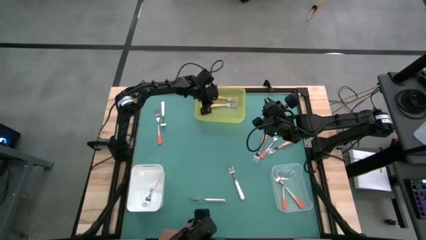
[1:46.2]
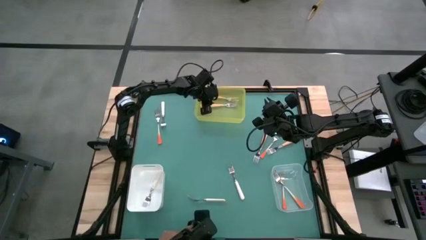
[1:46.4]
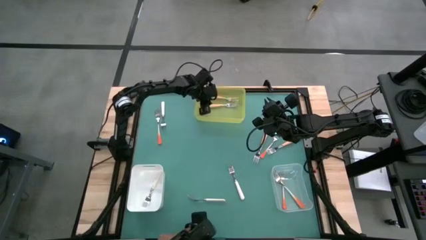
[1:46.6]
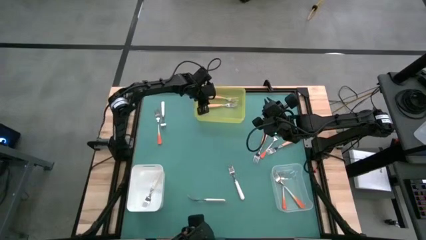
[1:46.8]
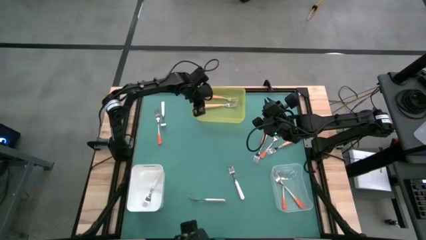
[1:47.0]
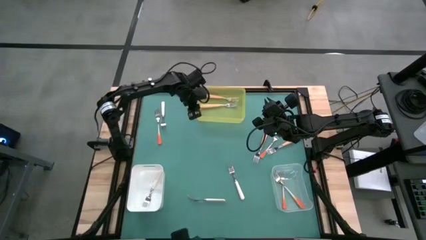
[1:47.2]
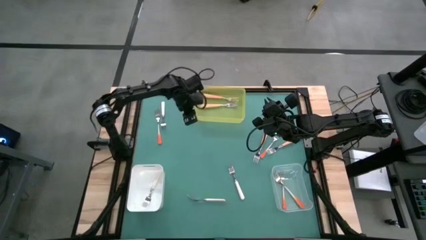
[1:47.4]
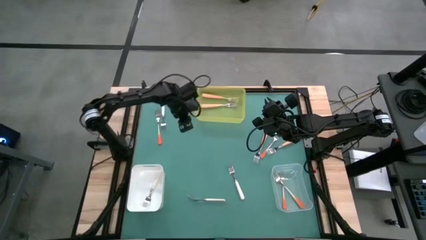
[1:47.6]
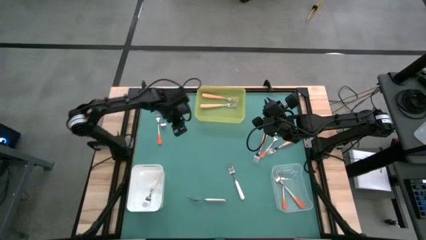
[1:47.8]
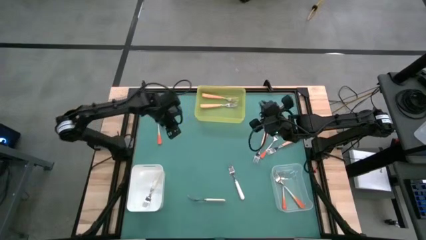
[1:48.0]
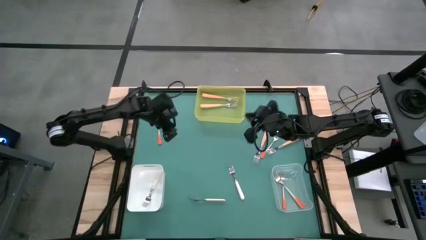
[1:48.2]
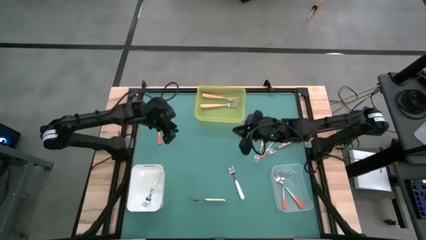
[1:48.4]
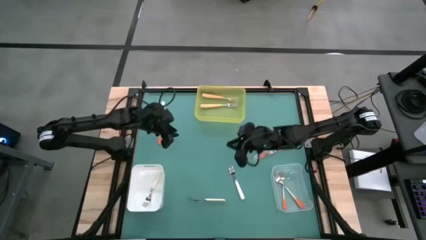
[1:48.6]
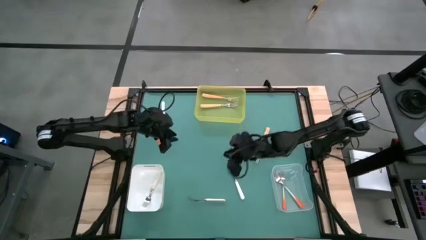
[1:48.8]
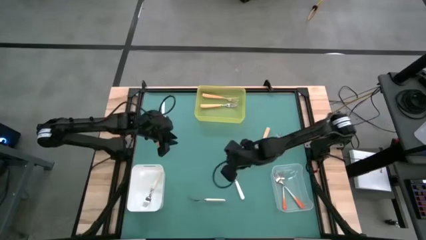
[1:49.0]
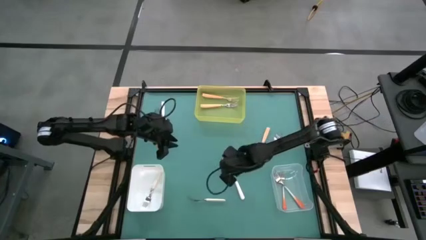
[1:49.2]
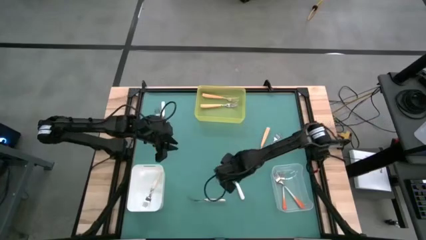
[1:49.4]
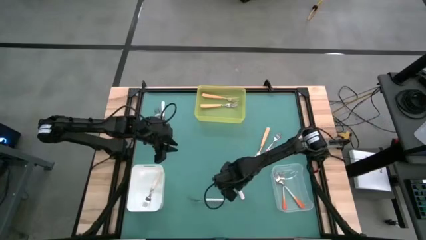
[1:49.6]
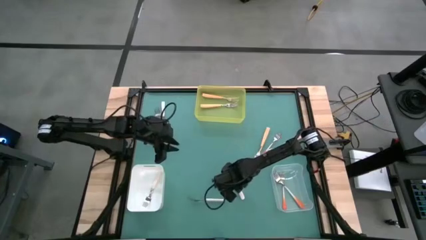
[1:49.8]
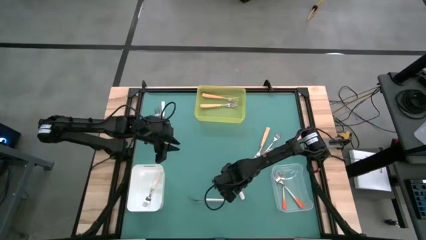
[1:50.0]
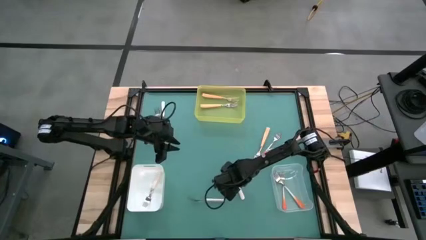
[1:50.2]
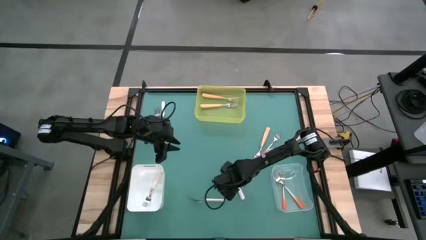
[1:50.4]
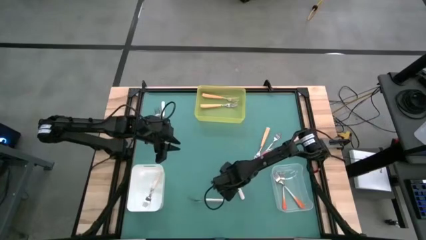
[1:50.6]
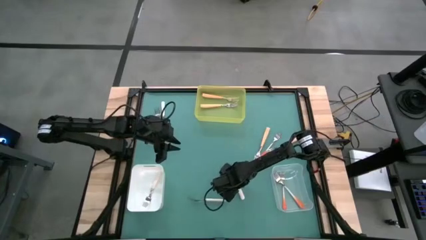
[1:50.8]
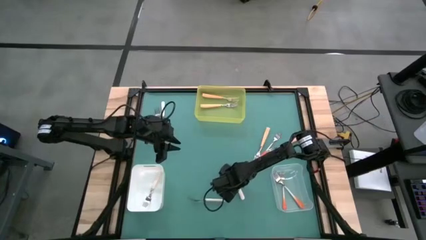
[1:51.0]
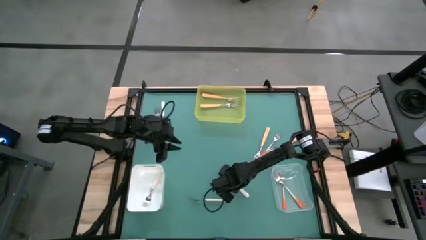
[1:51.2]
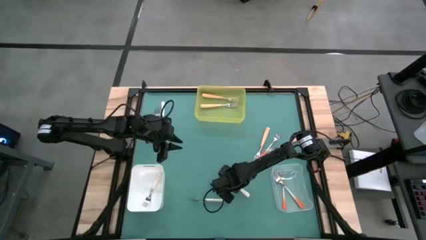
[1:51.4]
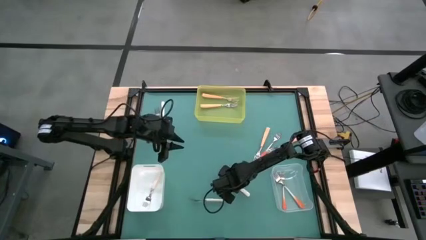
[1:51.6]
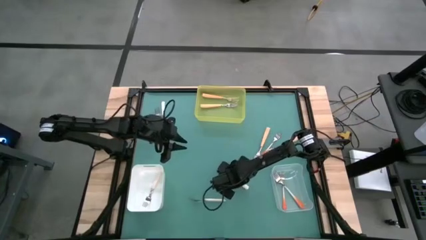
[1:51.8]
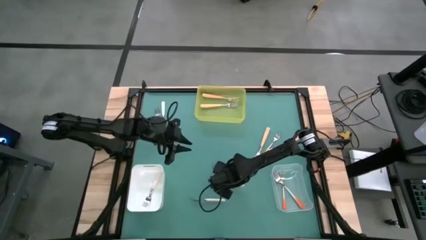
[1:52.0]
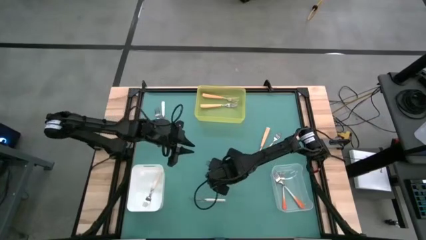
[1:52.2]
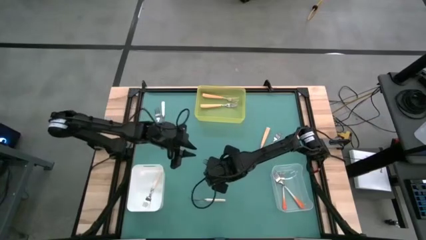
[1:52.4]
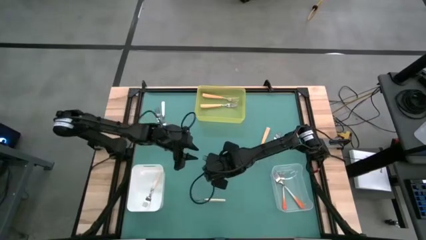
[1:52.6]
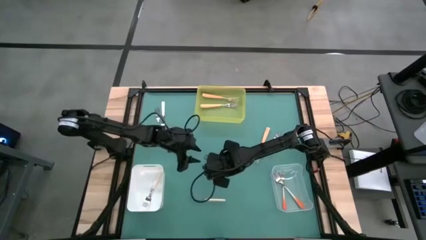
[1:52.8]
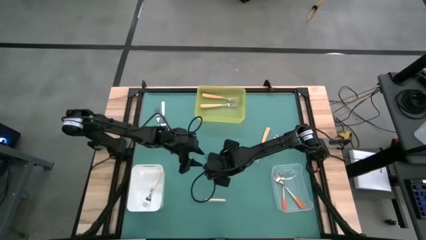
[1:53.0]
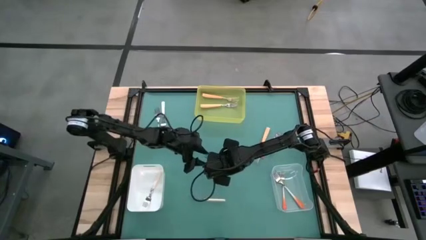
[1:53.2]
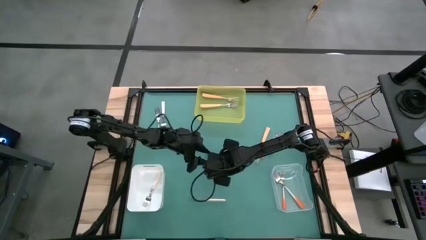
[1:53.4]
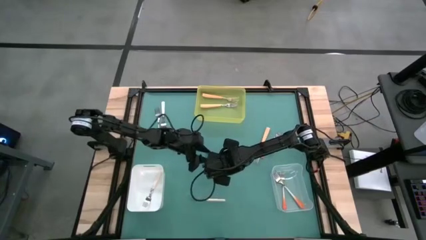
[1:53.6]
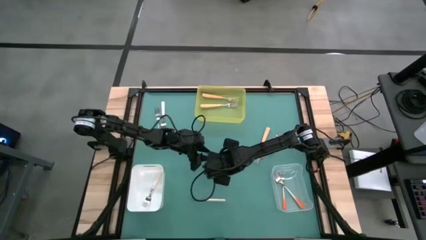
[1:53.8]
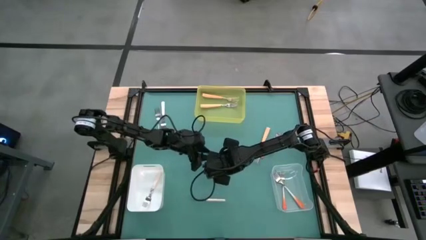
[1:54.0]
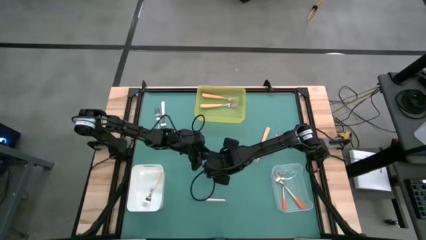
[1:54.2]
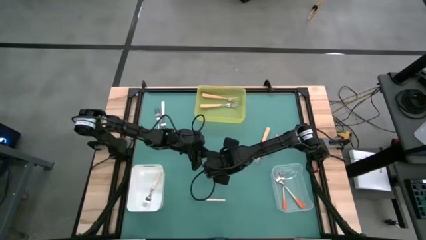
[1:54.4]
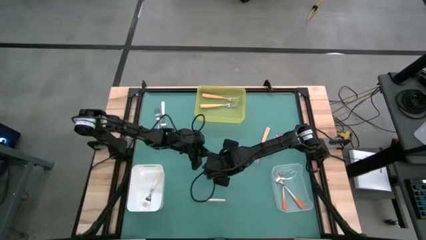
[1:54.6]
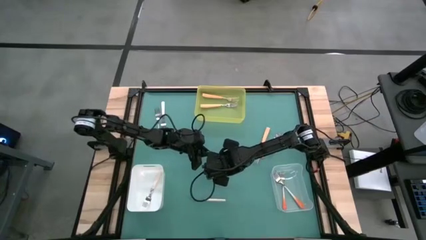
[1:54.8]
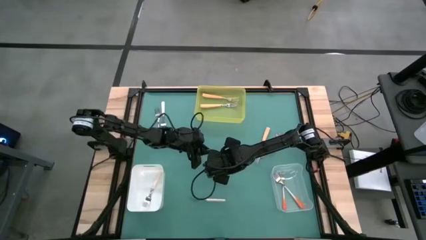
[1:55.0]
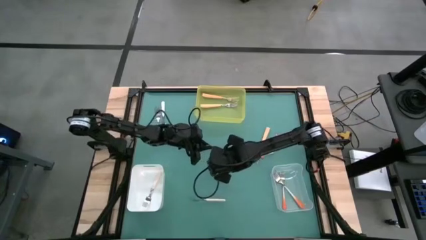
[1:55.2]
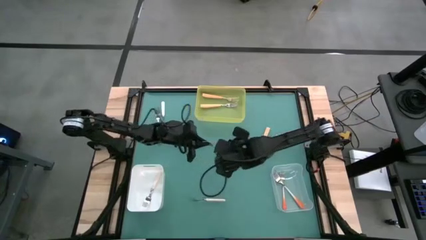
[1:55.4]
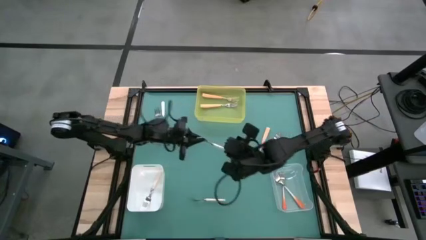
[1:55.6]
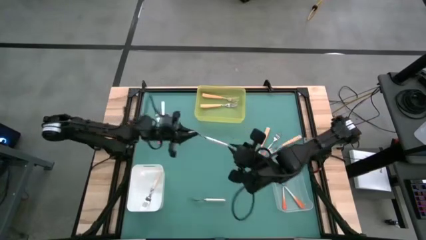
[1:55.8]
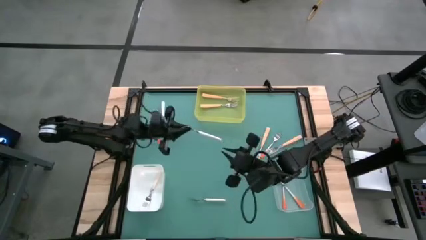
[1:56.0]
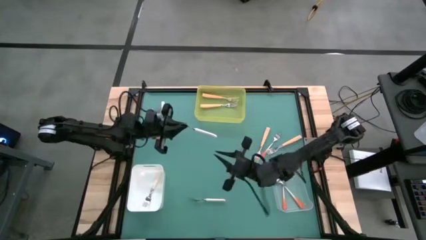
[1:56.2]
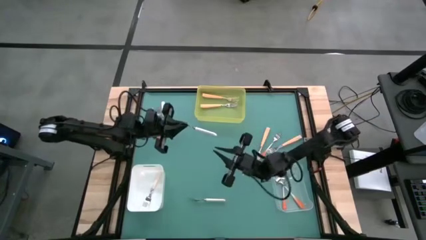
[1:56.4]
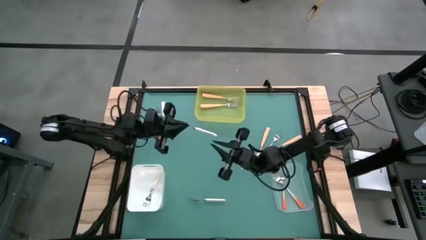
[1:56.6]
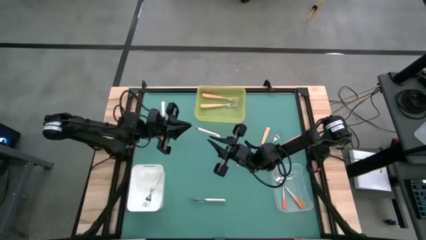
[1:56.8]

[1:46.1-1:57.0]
Task: Sort silverware by color (type)
Put the white fork into the white bin
